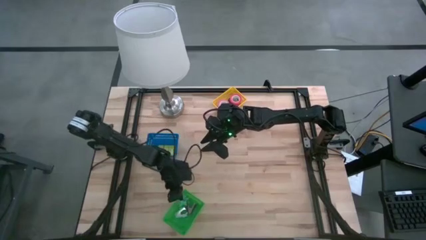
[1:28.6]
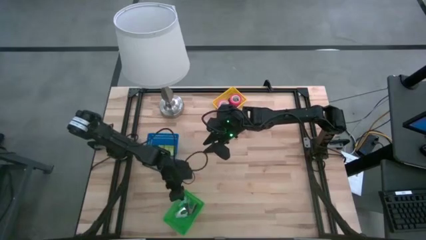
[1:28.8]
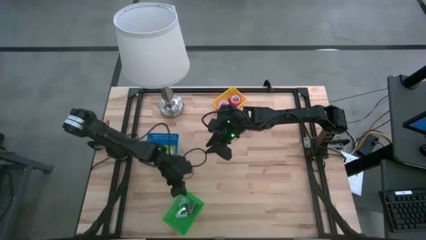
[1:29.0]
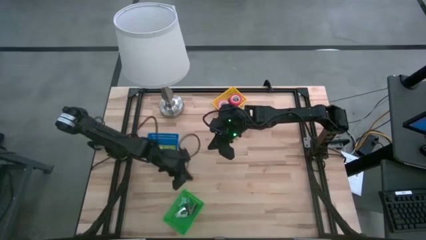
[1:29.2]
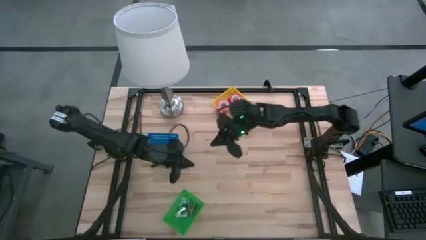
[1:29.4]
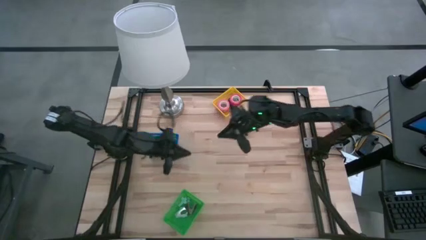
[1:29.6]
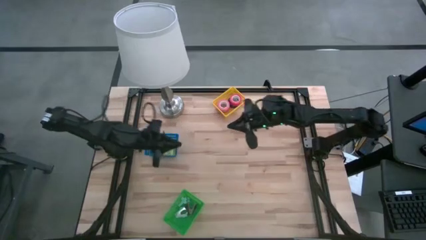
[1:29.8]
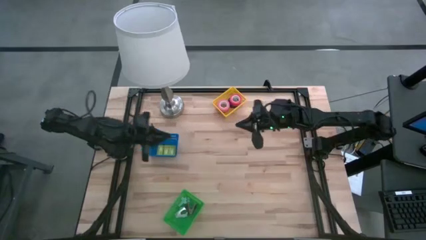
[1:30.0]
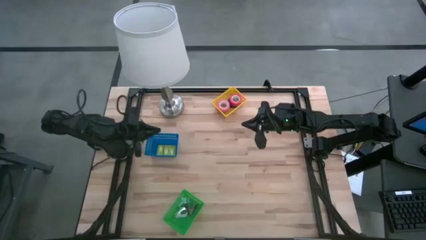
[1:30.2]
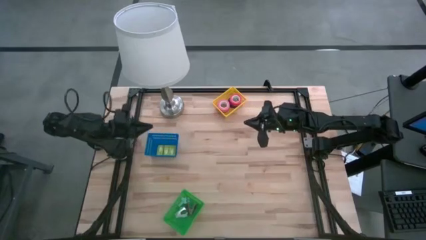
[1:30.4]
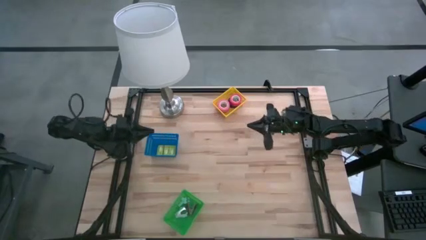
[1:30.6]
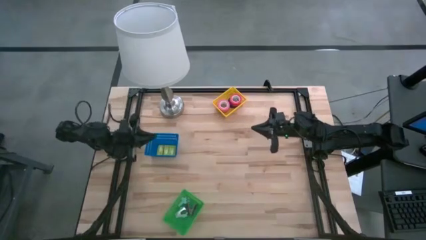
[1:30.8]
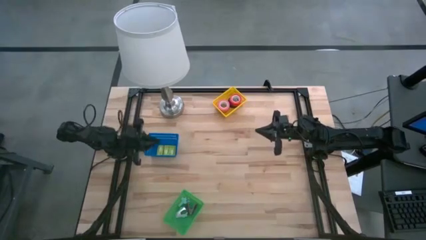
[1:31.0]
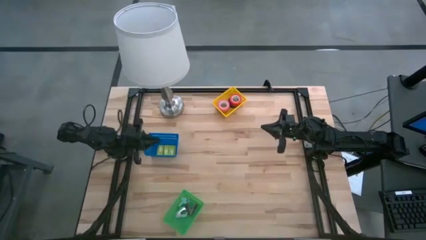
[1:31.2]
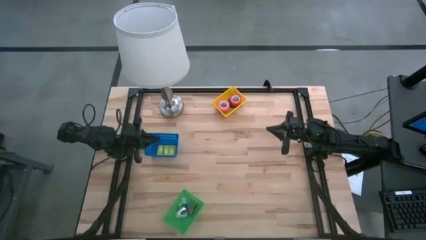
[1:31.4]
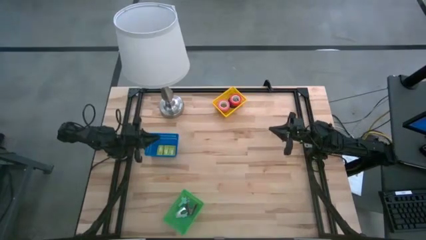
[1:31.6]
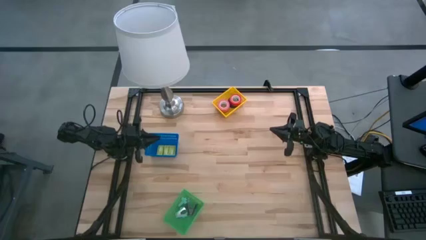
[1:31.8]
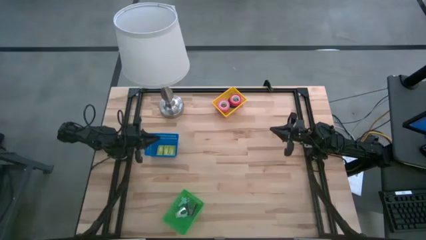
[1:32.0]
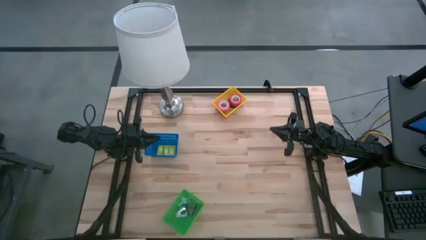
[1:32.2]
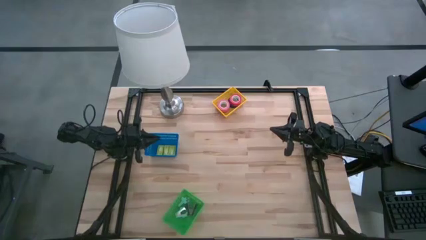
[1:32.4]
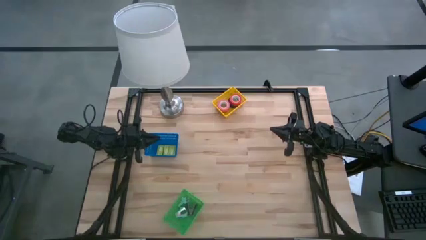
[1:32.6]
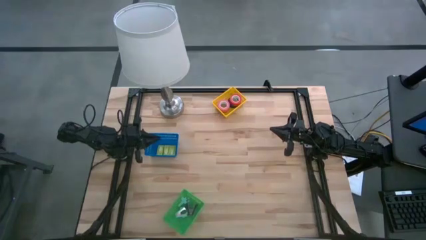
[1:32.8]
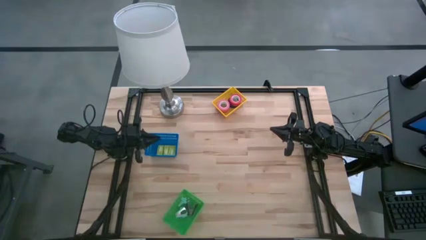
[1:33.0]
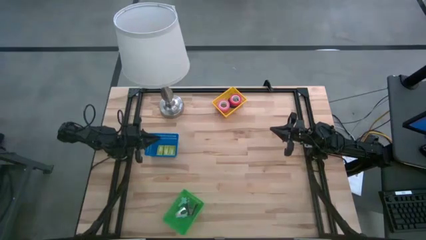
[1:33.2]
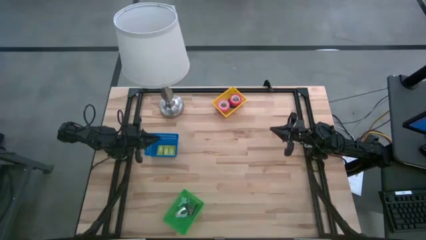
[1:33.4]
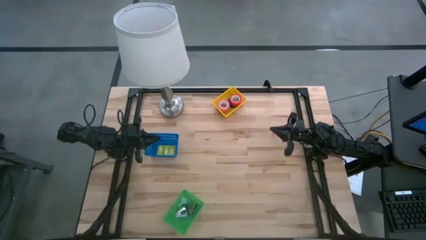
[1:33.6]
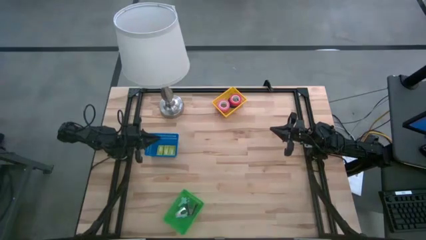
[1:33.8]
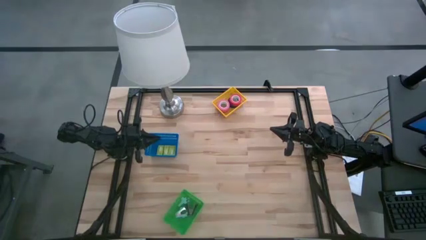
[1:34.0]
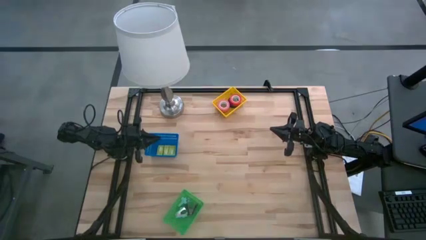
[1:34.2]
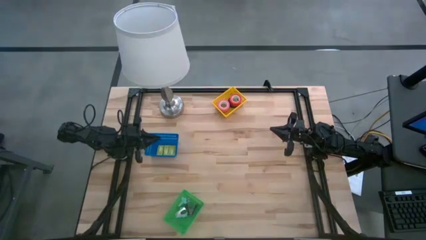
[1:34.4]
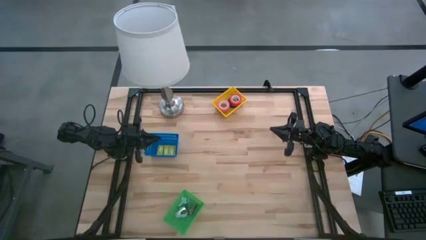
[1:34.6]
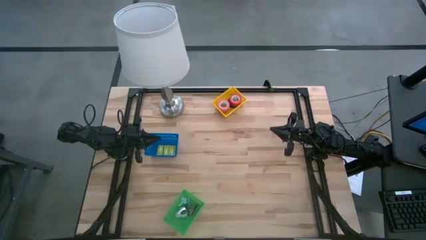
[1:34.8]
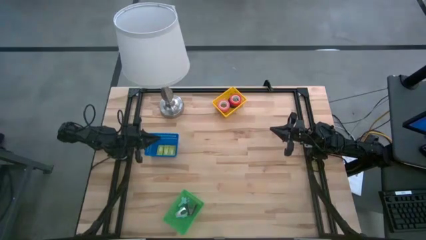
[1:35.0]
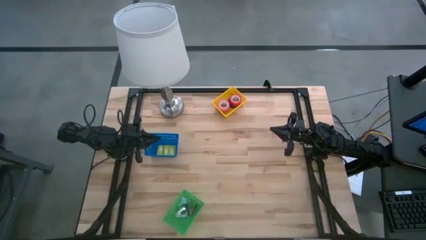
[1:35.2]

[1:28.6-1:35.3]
Task: Pick and place Stapler, Stapler remover, tape
Return to Home Position

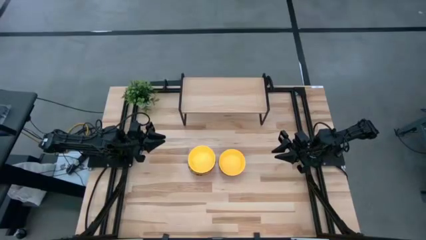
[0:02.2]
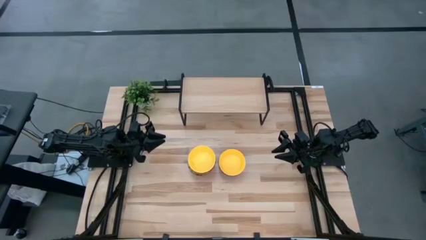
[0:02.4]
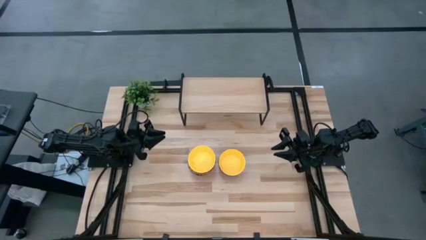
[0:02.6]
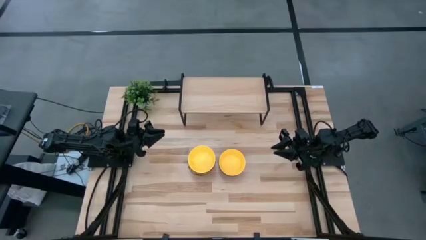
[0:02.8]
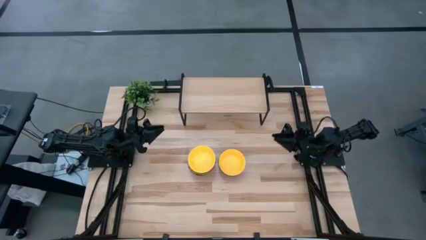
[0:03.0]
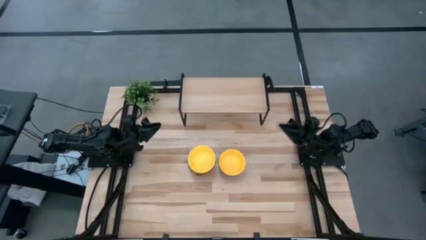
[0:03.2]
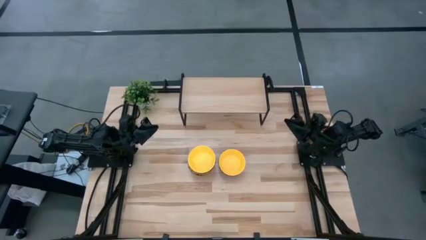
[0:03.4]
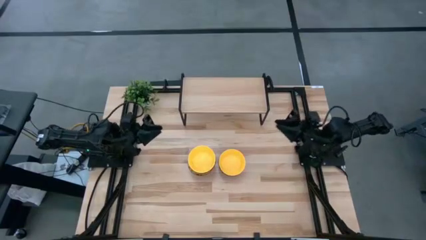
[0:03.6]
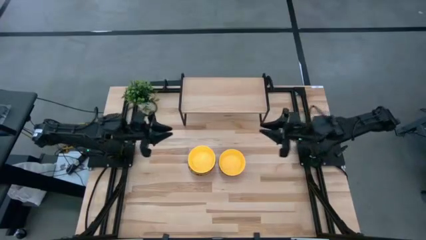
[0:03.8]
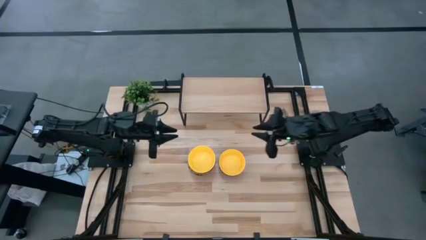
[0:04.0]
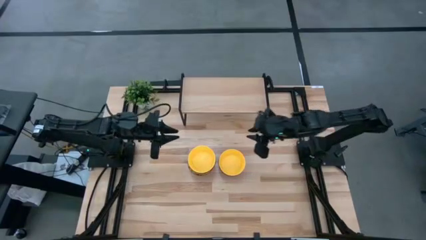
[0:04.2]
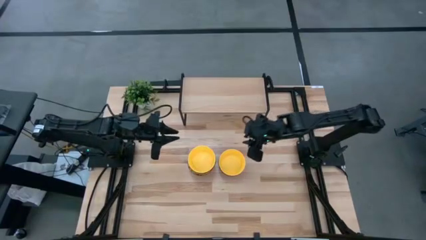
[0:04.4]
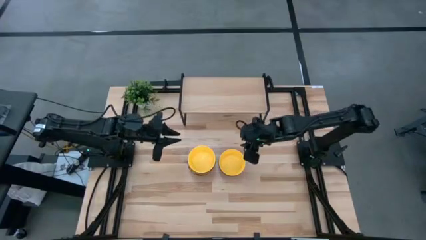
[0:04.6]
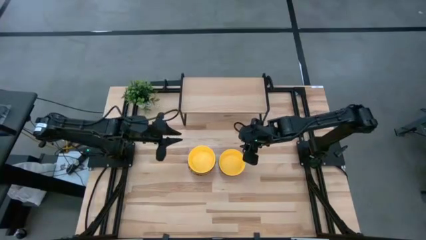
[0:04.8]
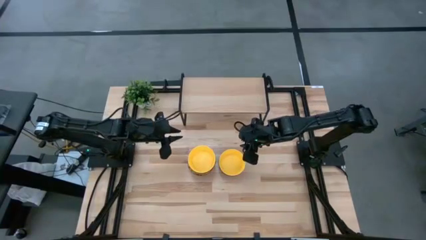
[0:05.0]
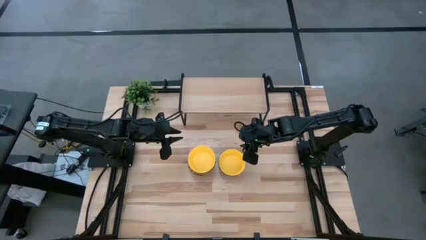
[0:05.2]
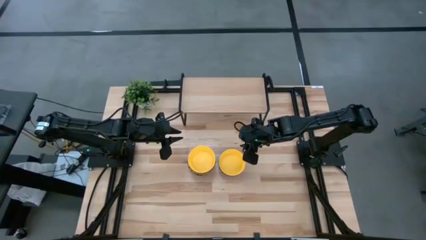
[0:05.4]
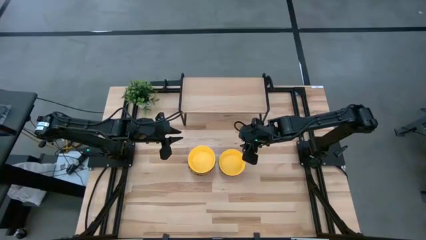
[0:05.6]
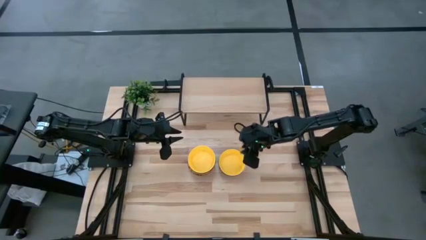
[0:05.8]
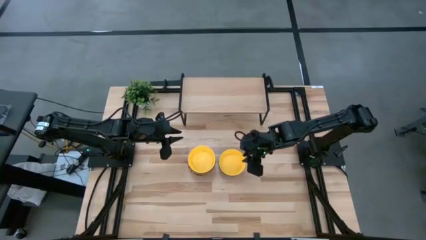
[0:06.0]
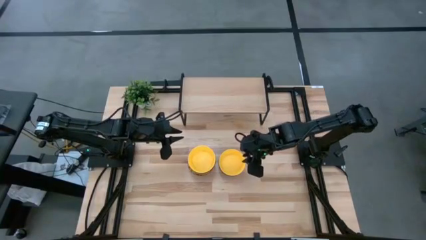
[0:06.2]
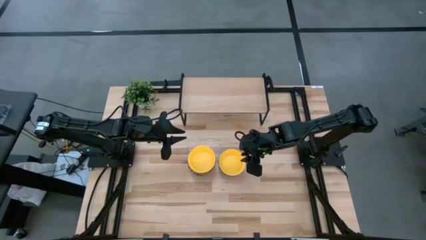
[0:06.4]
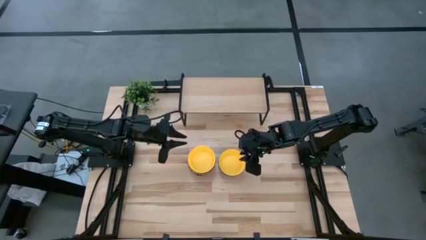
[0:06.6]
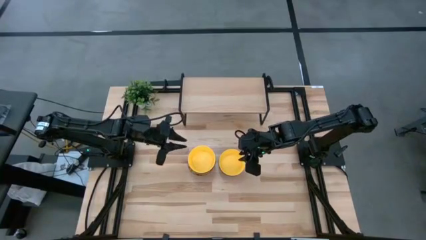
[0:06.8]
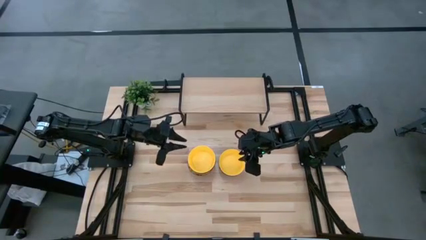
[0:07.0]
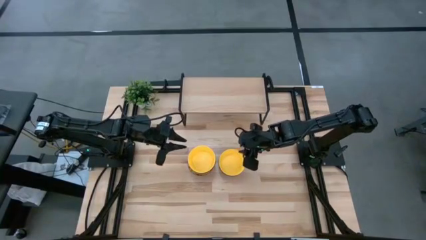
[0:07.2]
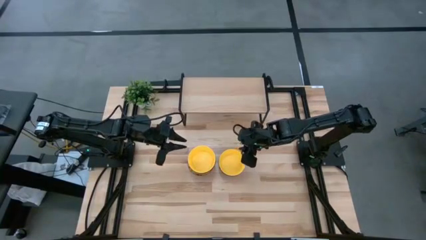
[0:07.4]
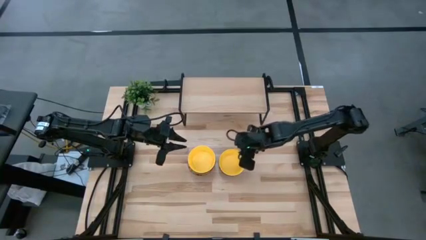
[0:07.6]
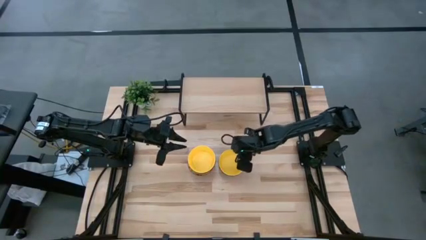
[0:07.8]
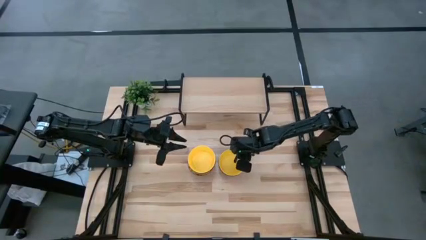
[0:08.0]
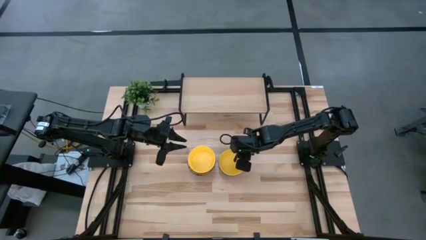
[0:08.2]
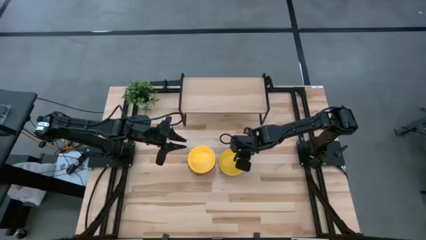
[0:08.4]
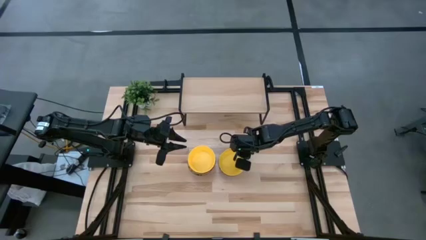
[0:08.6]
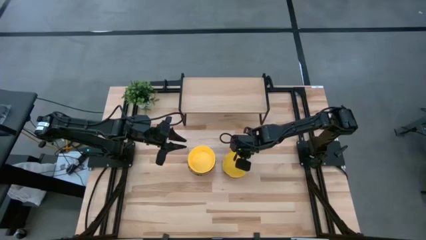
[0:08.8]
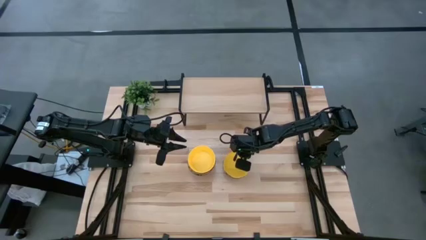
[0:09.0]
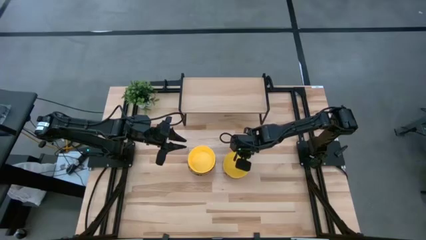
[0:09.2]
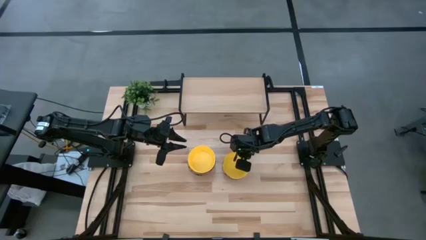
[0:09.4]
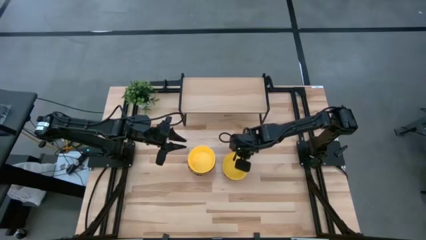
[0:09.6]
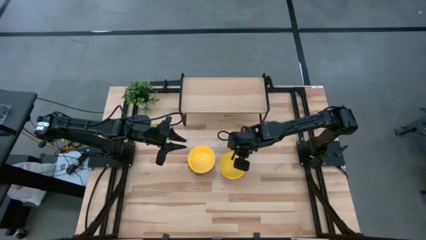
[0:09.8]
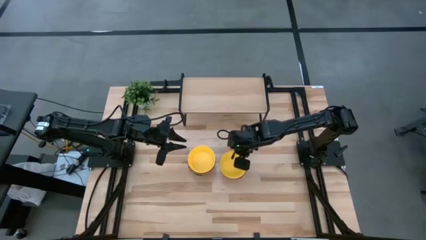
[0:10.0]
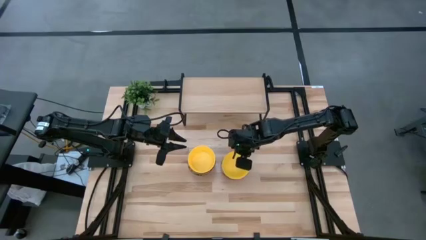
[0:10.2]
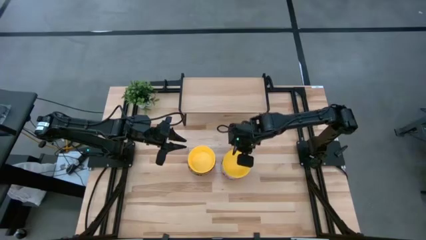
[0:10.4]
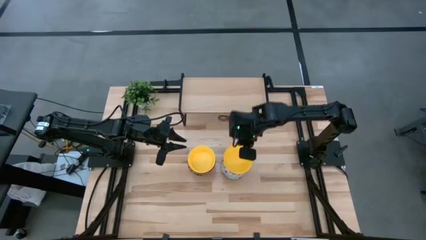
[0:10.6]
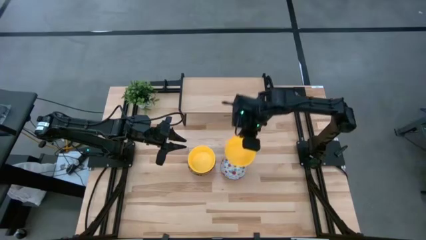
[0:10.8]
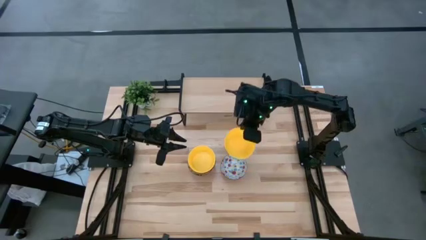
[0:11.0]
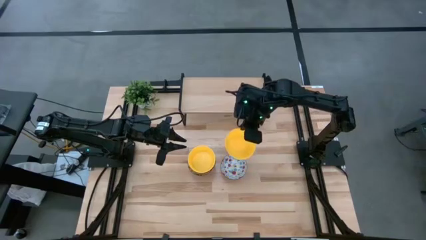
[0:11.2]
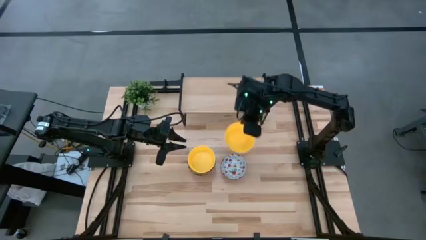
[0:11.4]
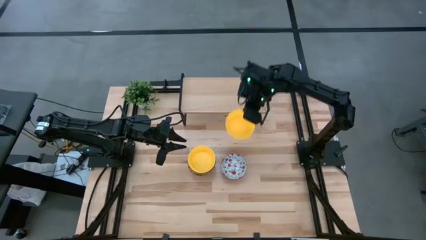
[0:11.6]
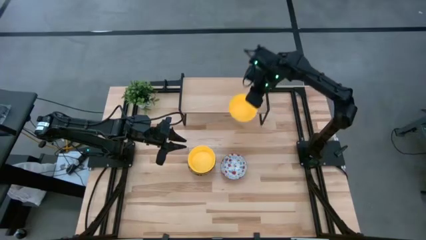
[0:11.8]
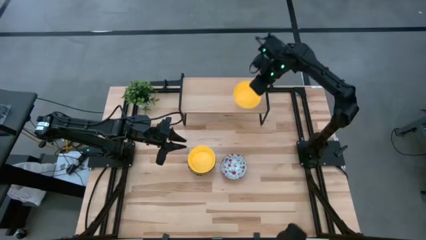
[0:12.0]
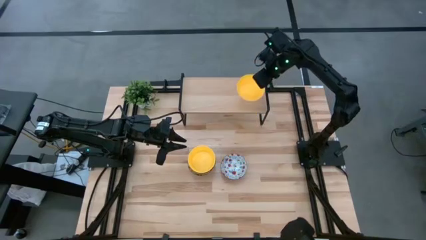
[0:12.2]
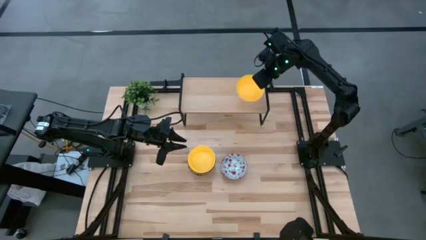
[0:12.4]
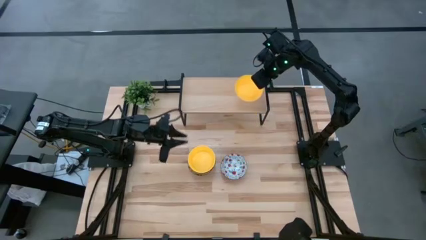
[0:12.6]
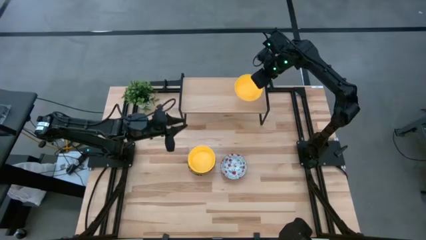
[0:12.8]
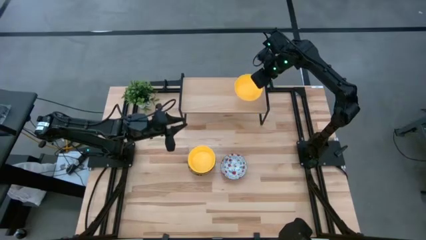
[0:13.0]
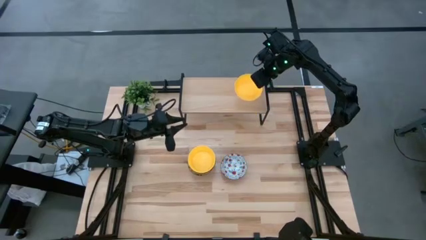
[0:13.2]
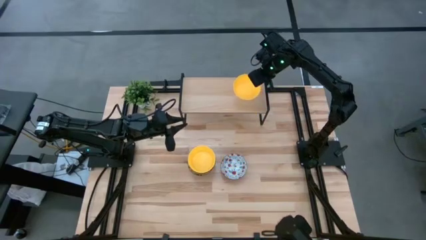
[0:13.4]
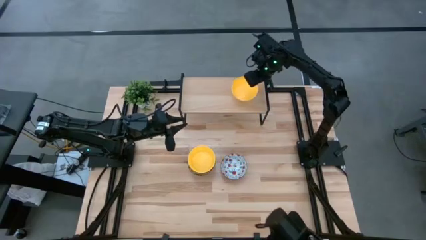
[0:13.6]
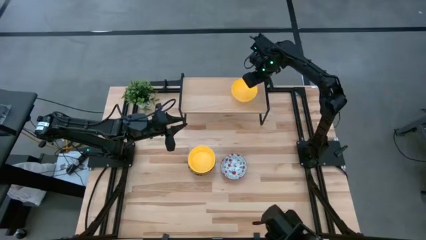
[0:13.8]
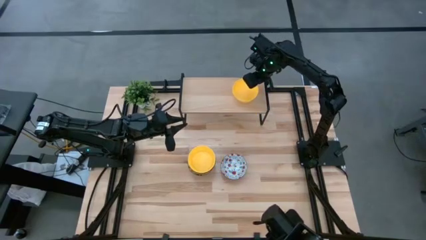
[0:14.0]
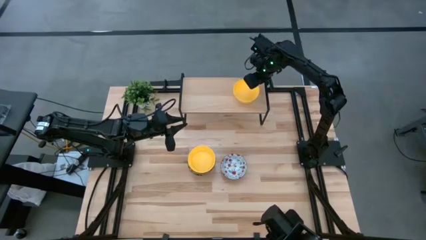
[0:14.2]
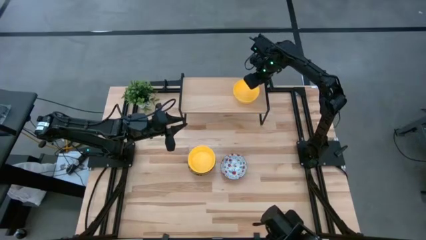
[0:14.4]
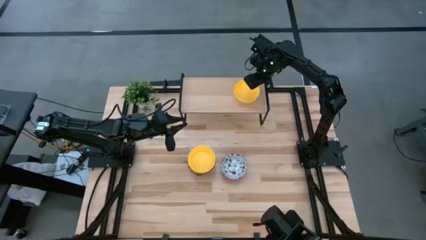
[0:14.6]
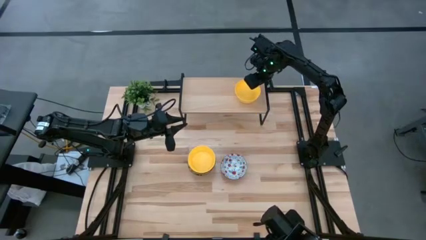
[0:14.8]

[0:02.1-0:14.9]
Task: Pick & Place Mini bowls
Put the bottom right yellow bowl on the shelf
